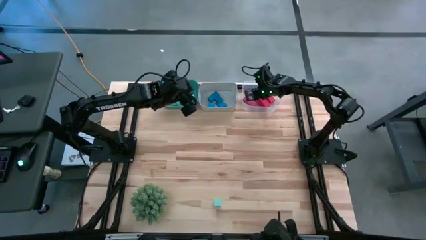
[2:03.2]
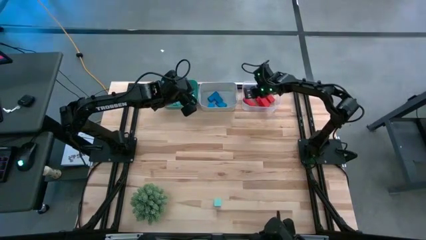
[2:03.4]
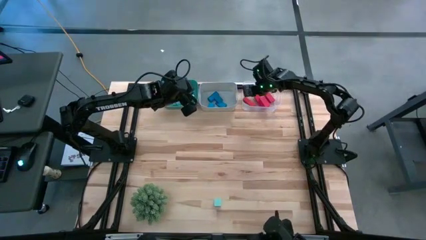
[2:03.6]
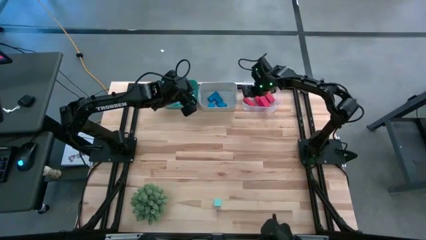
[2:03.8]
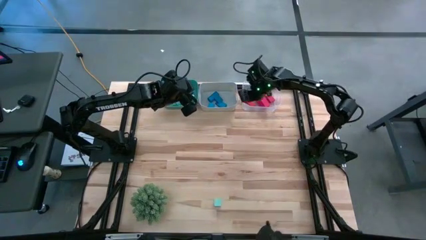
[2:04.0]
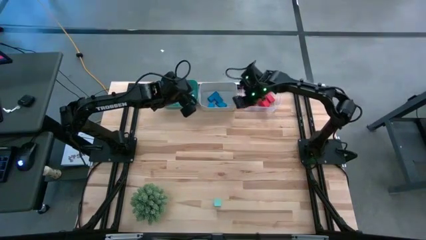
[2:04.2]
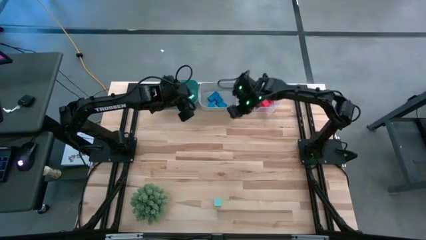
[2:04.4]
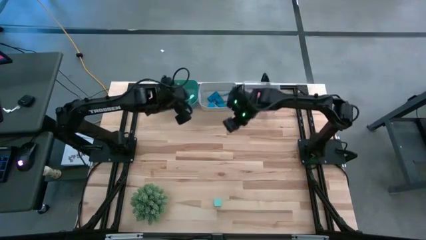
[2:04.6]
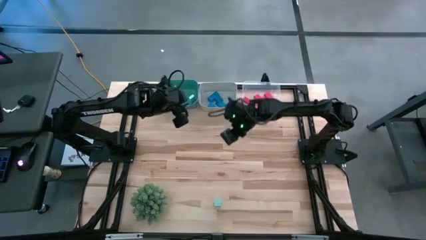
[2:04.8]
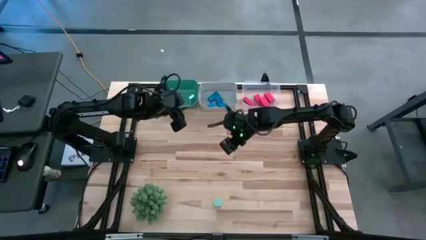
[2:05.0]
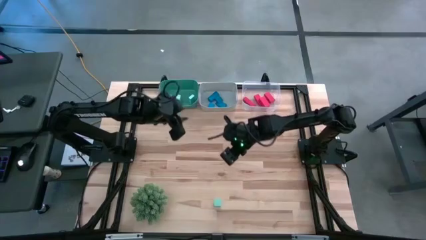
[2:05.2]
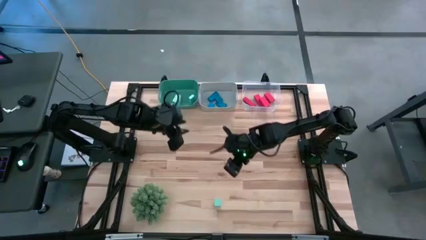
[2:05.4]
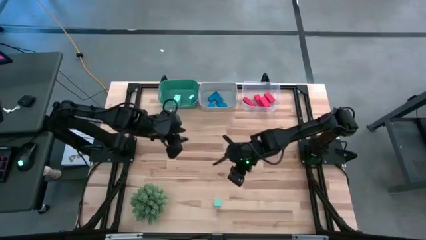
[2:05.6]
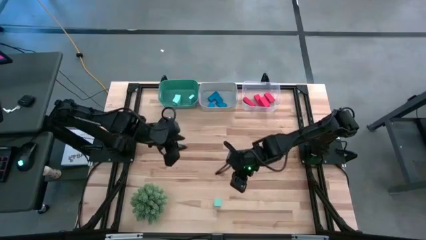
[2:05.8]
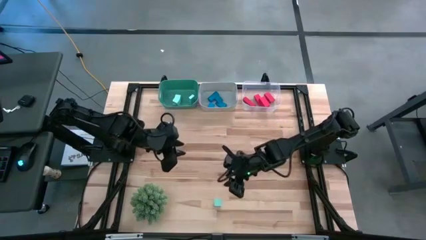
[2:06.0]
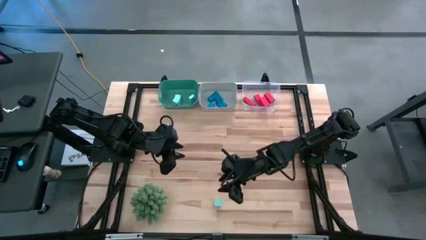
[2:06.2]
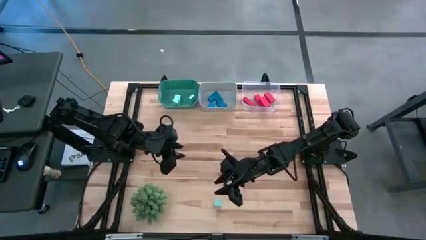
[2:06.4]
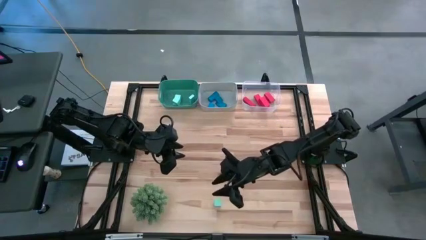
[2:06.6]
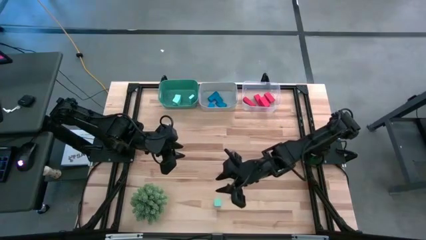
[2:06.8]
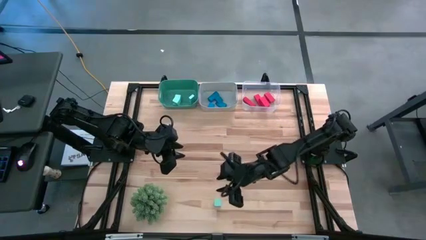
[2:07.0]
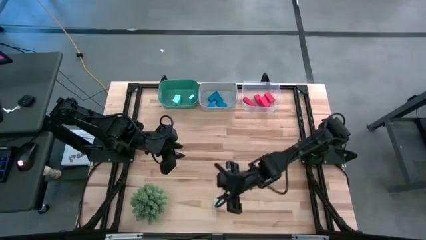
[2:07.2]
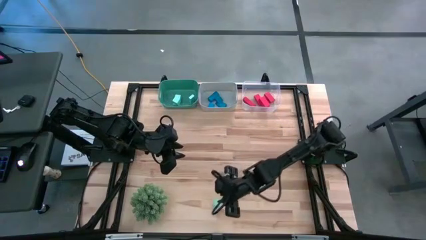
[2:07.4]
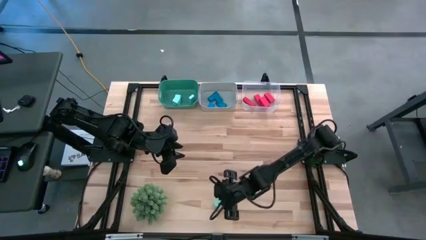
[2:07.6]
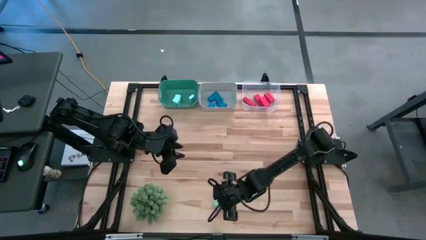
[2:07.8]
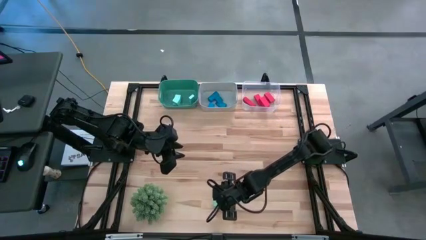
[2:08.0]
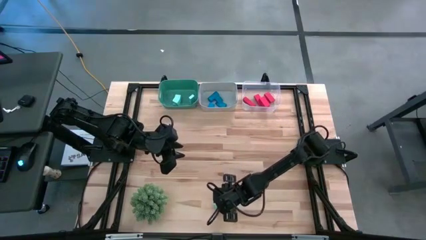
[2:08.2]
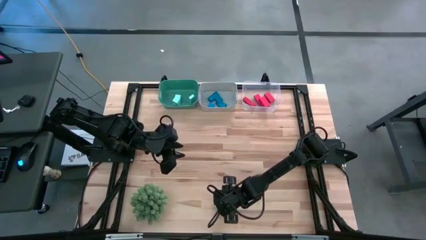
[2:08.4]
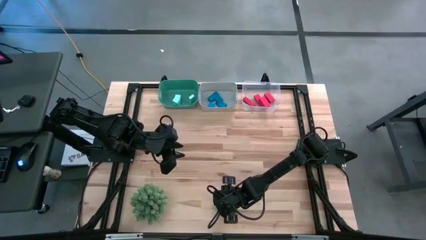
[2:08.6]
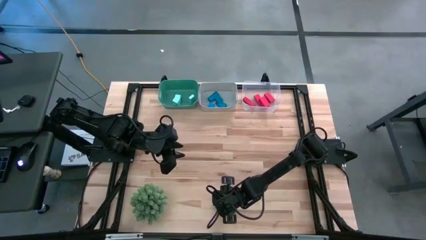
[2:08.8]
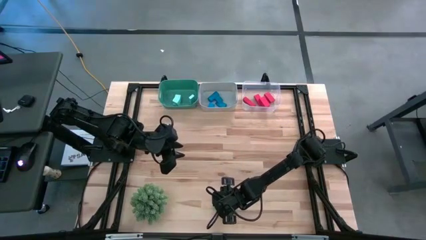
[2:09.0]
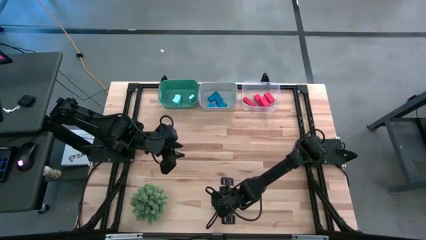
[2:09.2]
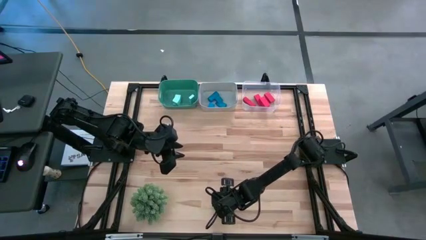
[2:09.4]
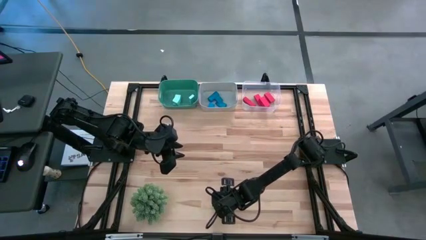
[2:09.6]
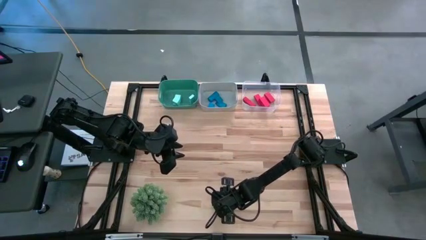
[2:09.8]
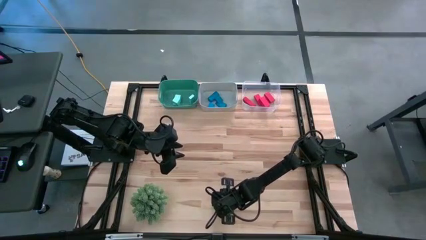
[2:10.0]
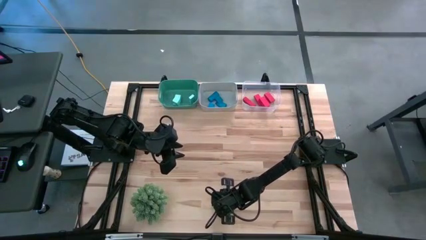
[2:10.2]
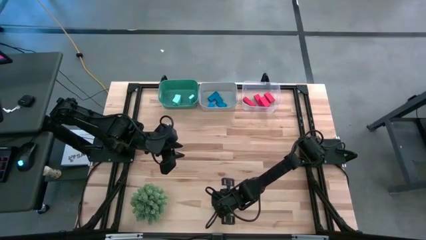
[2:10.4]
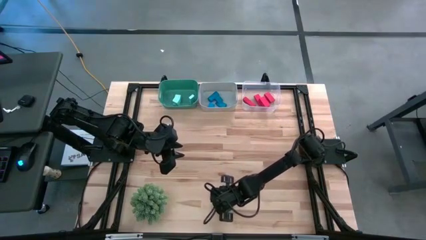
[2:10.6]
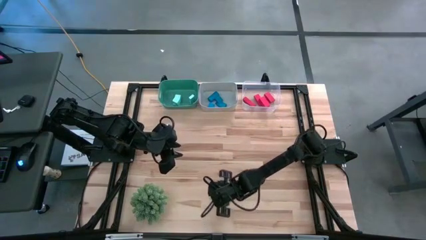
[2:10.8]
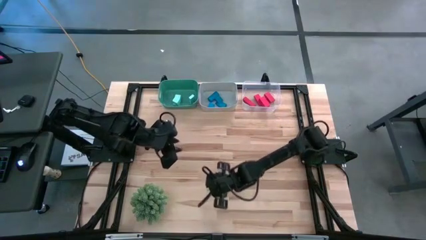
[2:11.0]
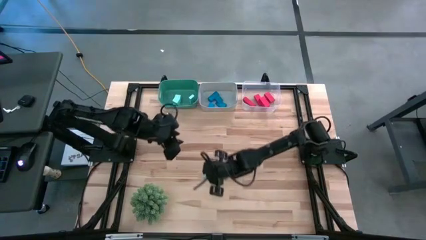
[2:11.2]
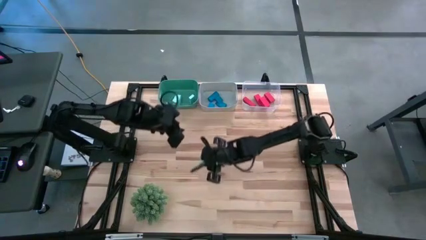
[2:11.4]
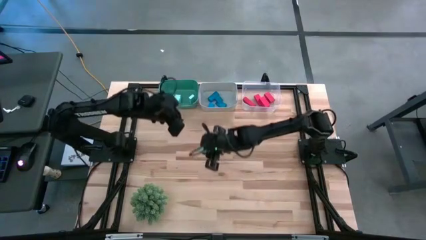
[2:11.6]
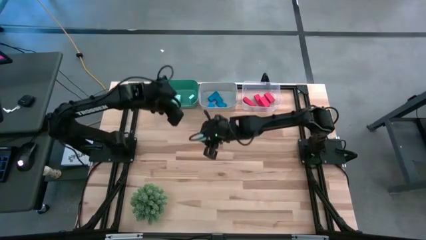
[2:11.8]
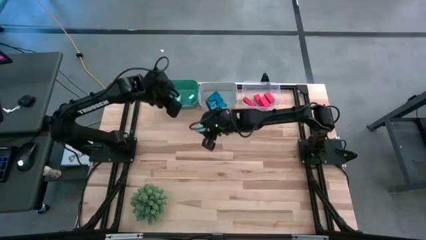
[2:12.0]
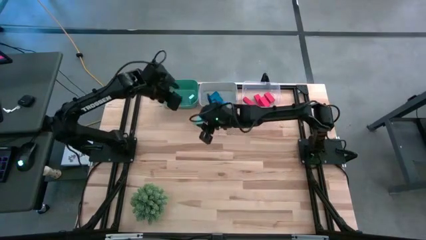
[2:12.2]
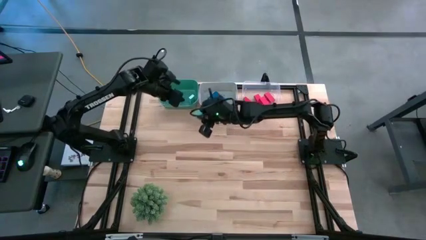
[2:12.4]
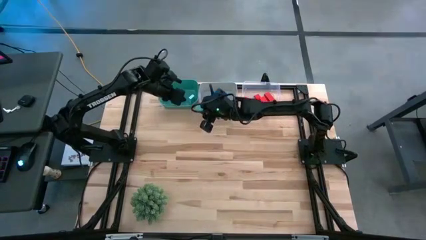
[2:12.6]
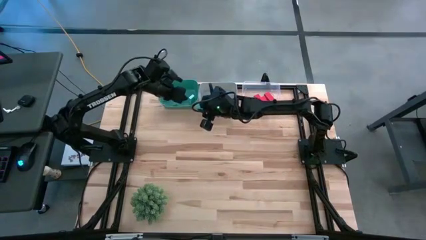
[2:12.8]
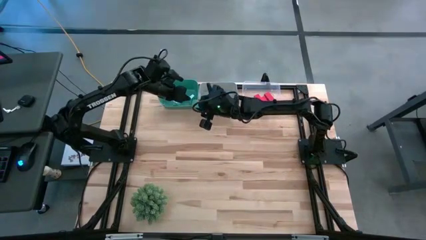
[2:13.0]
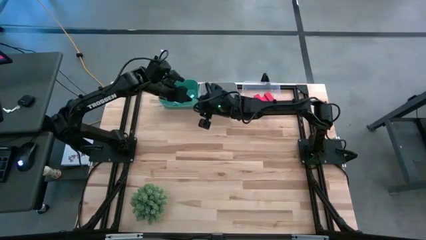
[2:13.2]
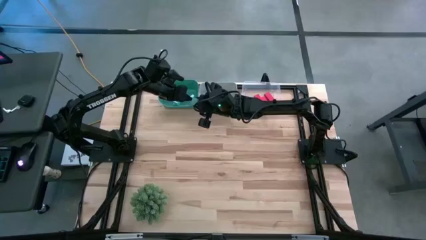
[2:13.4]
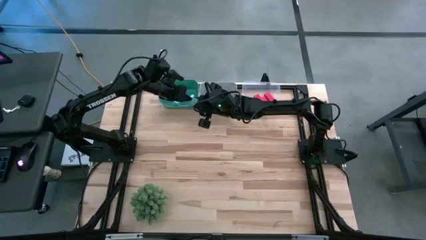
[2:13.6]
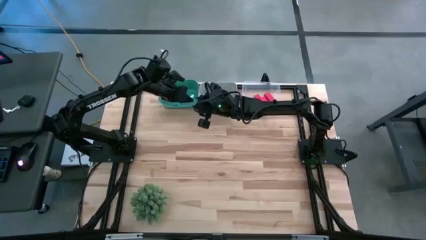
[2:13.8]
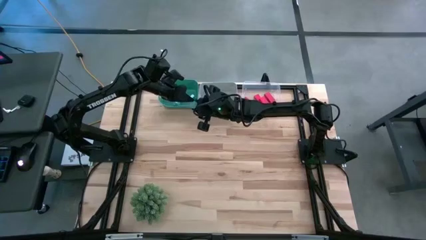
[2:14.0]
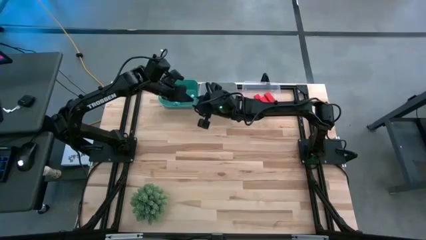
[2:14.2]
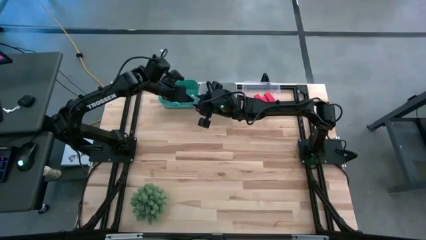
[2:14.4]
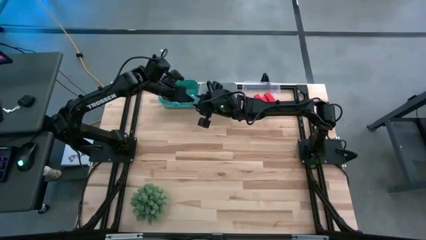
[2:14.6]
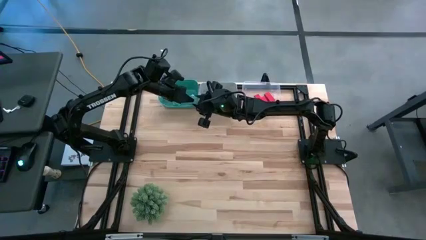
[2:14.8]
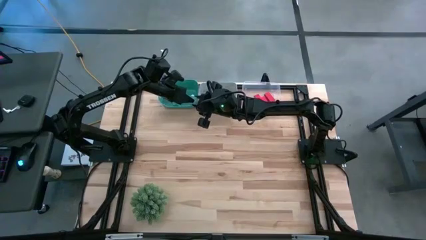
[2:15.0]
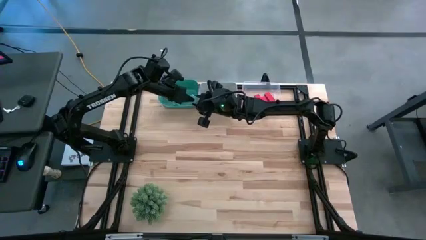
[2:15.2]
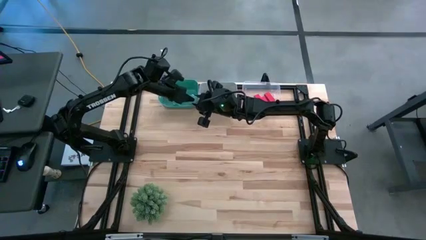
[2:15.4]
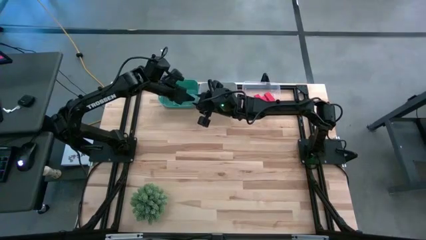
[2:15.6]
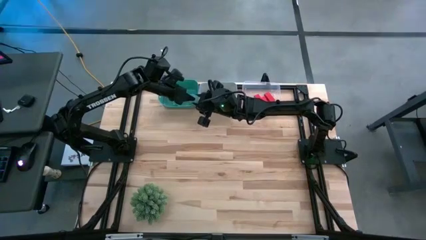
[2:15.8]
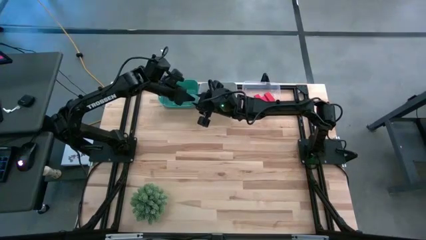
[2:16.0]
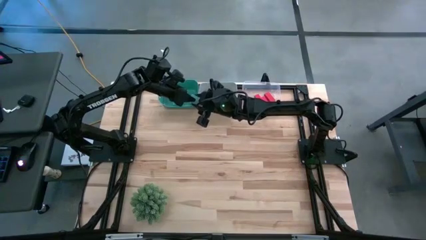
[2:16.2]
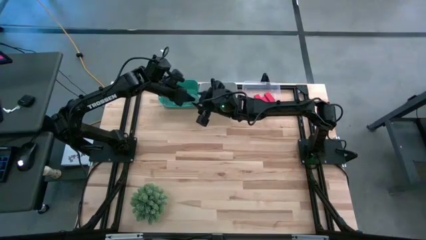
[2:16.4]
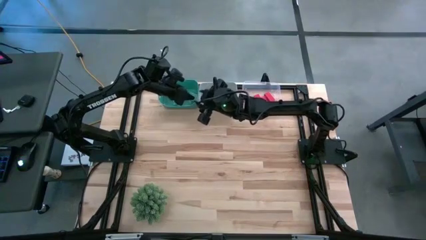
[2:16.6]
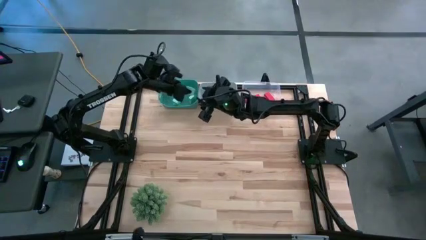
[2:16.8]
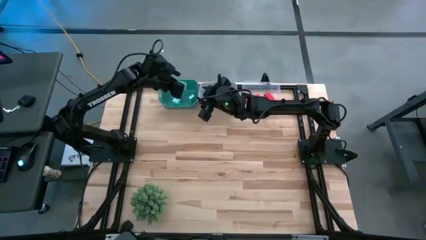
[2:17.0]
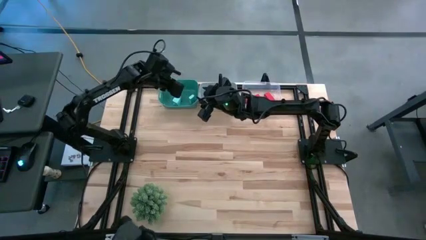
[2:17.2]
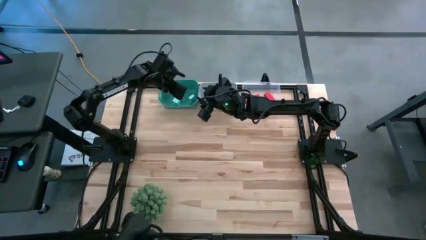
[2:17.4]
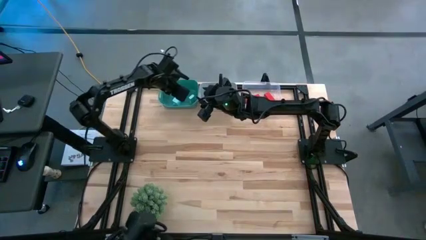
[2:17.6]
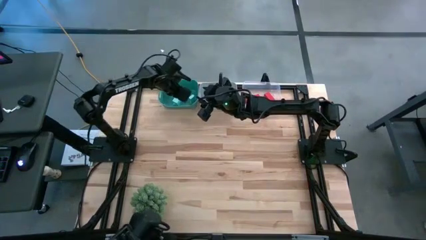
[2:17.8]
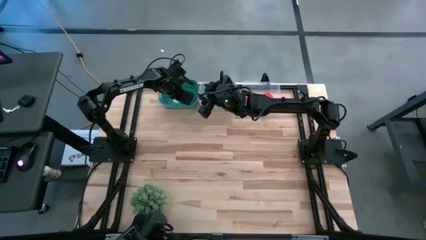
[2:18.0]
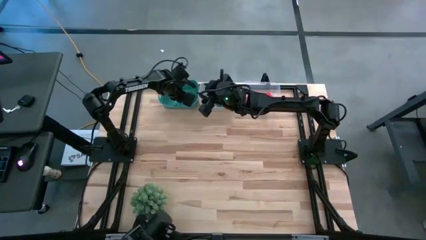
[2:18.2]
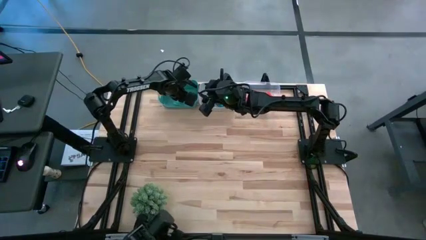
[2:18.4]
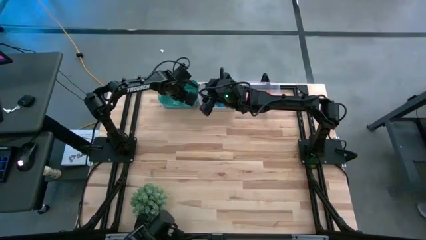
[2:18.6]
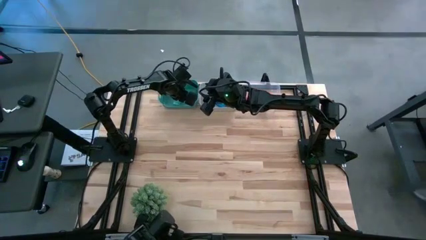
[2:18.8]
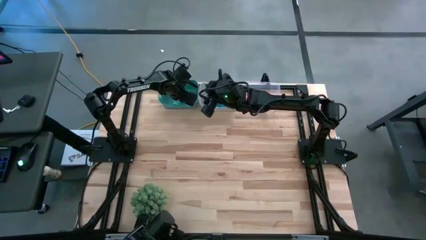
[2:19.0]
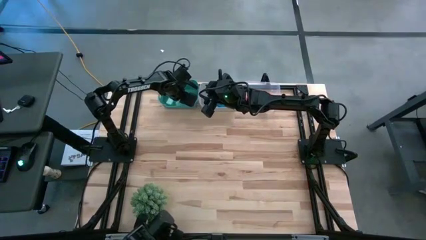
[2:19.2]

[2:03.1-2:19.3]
Task: Sort & place blocks by color
Put the light blue block into the green bin
